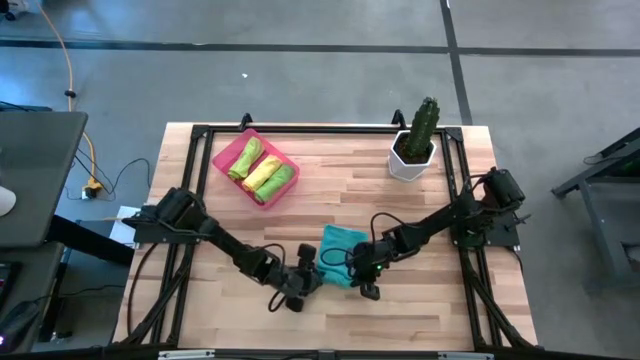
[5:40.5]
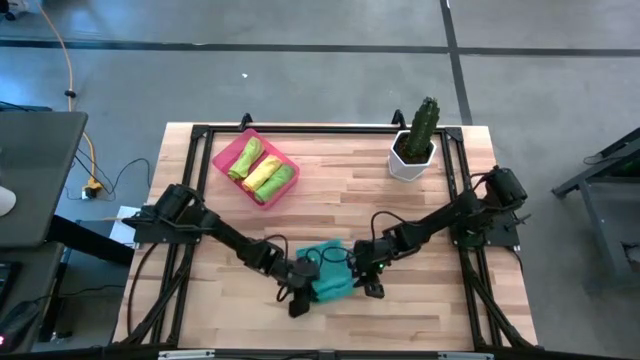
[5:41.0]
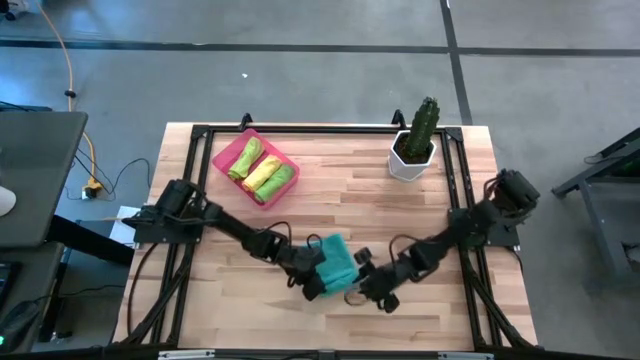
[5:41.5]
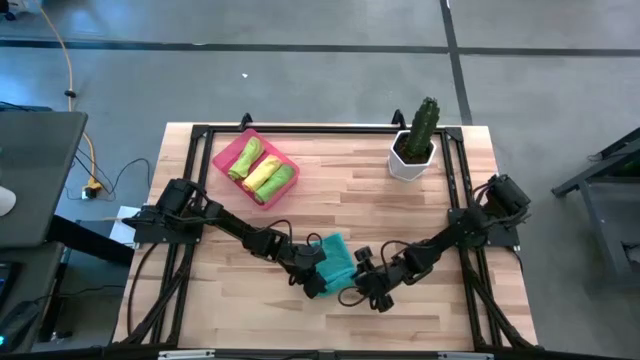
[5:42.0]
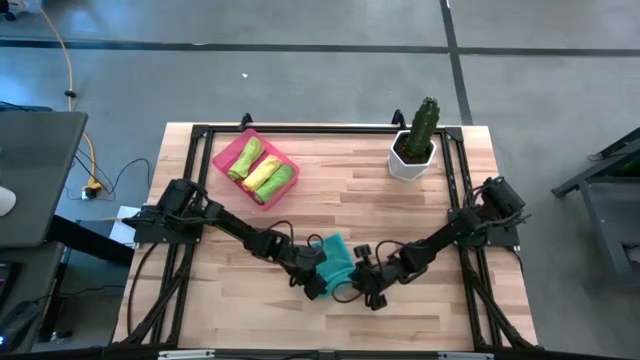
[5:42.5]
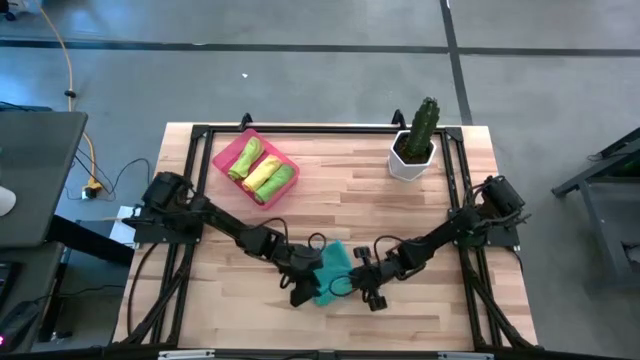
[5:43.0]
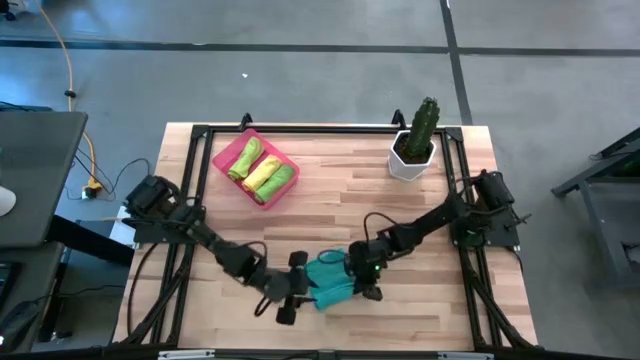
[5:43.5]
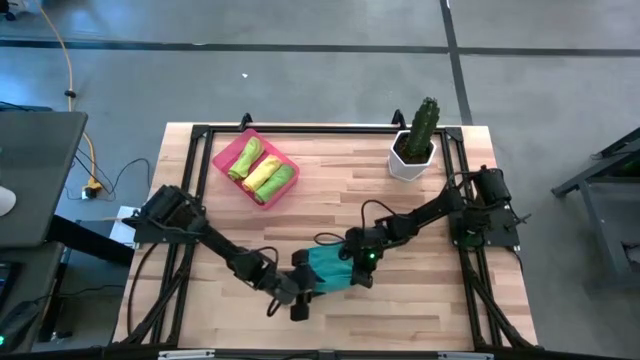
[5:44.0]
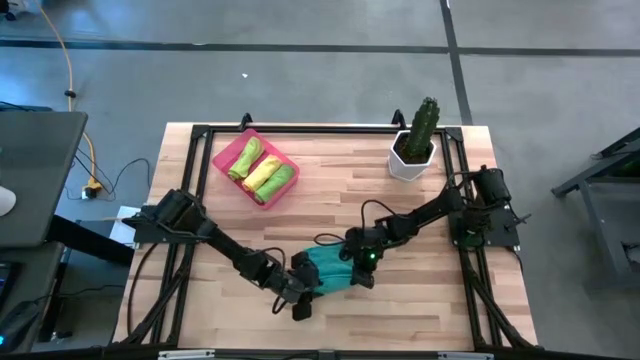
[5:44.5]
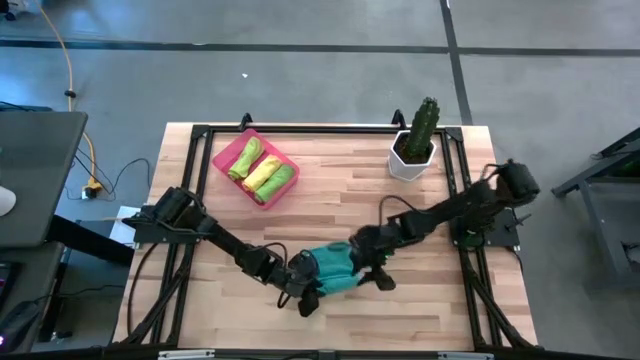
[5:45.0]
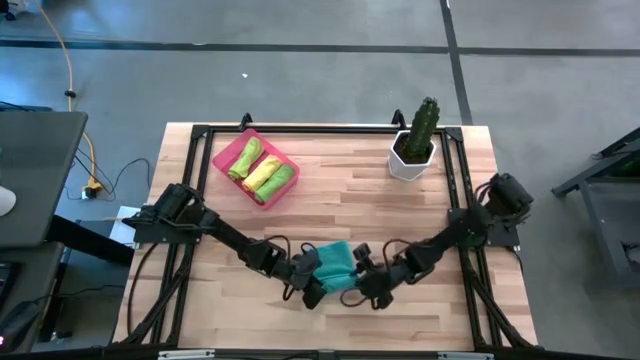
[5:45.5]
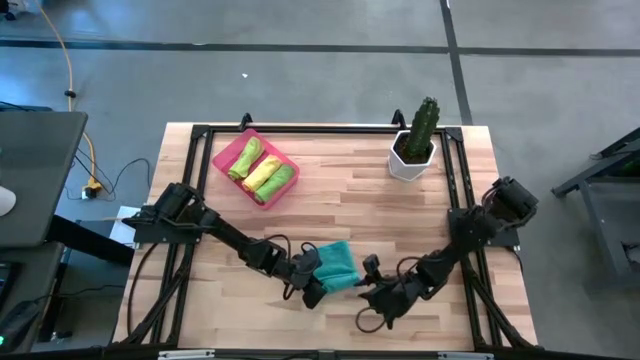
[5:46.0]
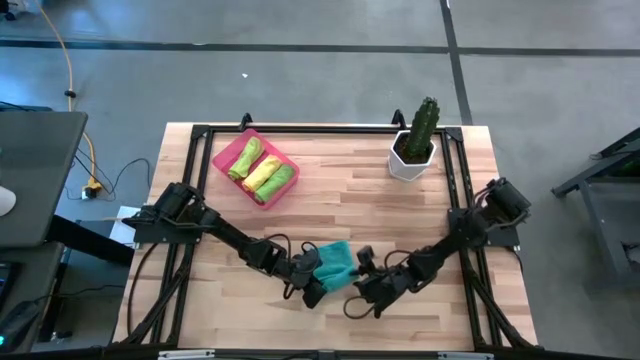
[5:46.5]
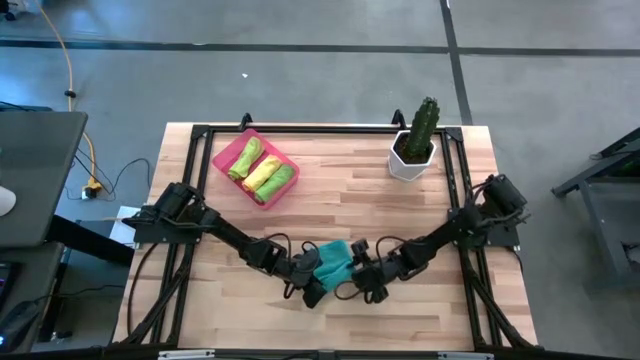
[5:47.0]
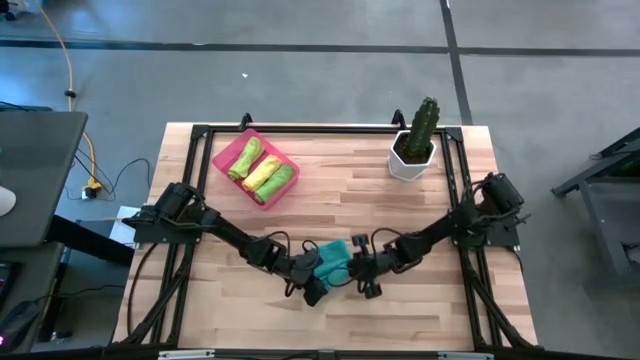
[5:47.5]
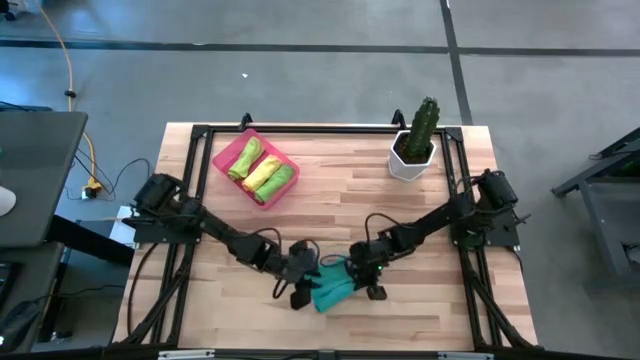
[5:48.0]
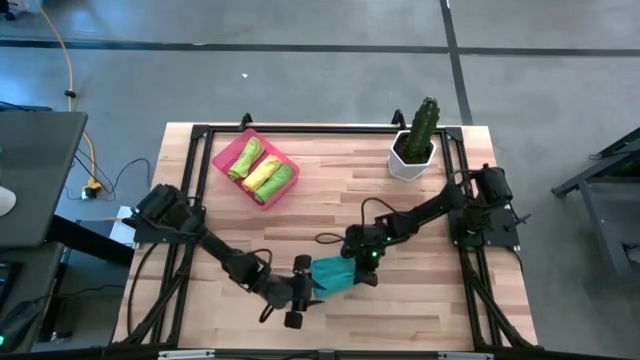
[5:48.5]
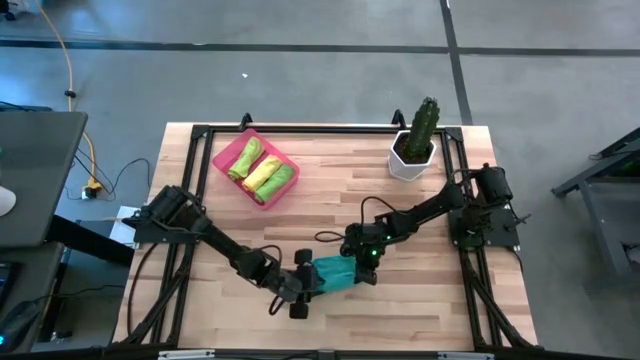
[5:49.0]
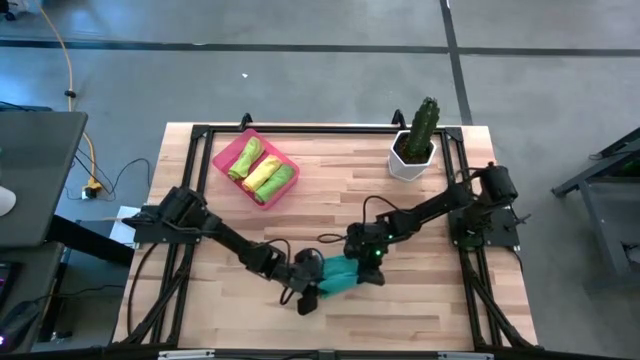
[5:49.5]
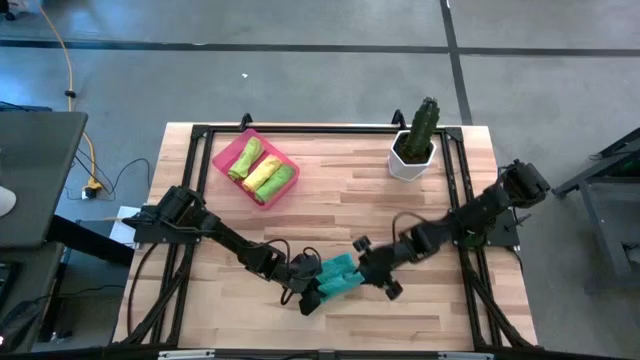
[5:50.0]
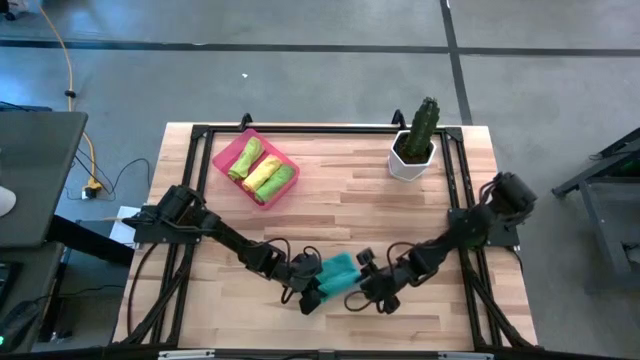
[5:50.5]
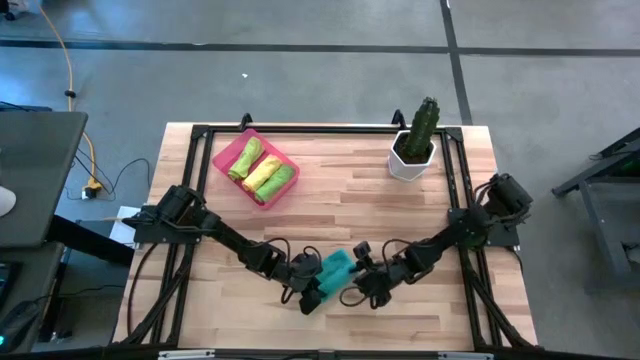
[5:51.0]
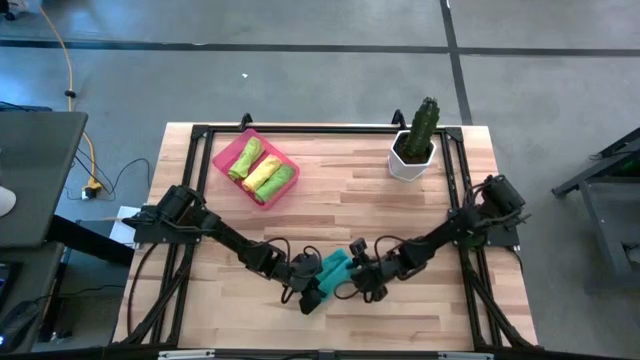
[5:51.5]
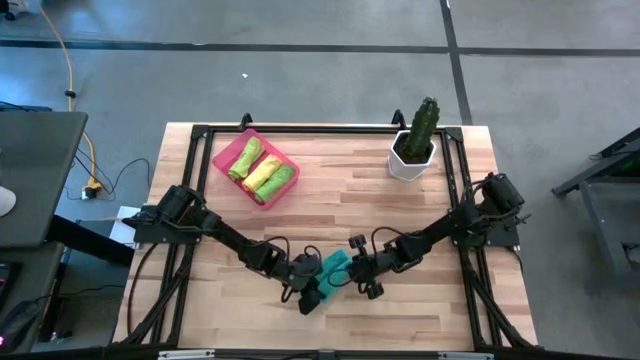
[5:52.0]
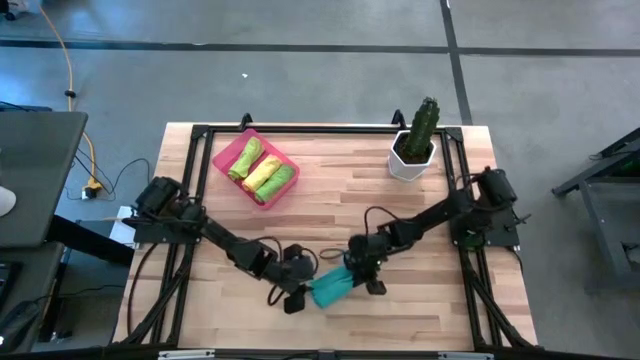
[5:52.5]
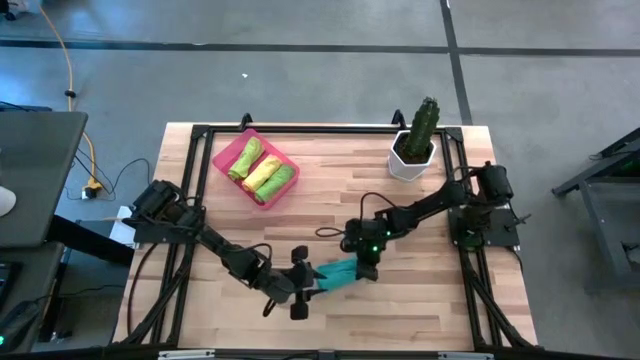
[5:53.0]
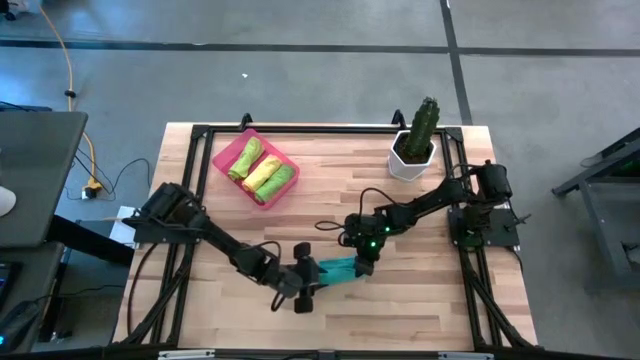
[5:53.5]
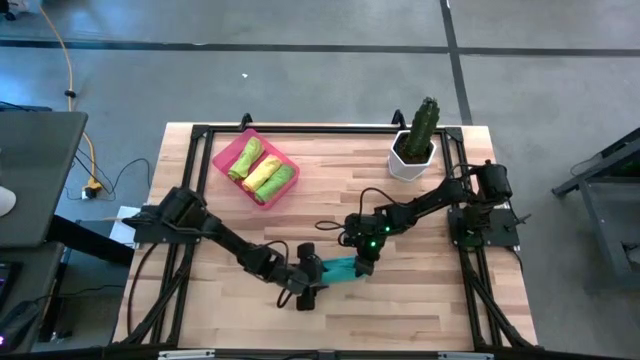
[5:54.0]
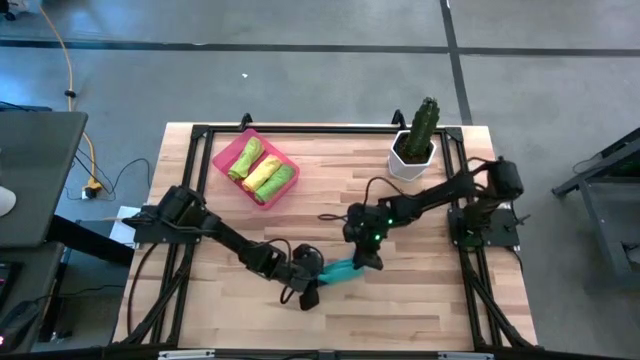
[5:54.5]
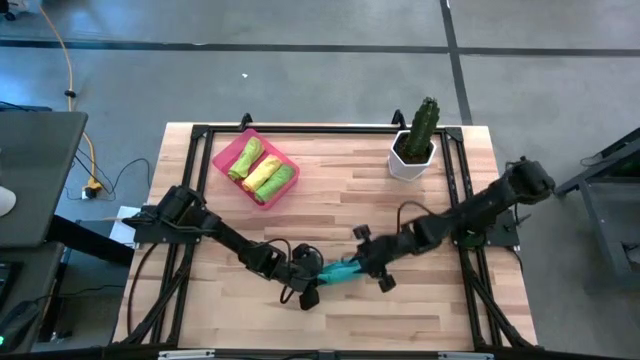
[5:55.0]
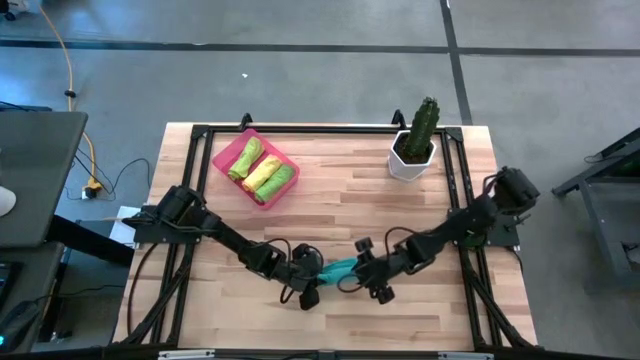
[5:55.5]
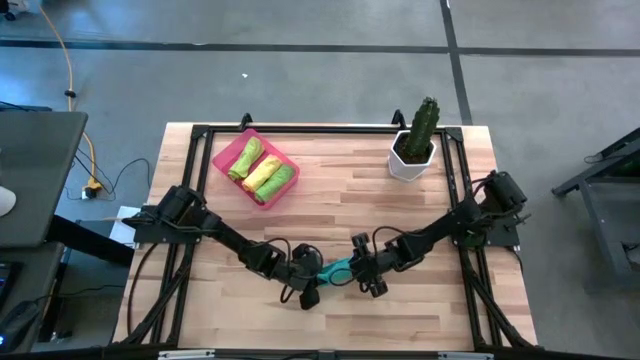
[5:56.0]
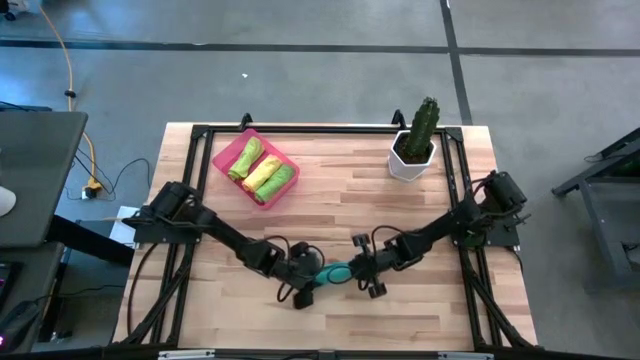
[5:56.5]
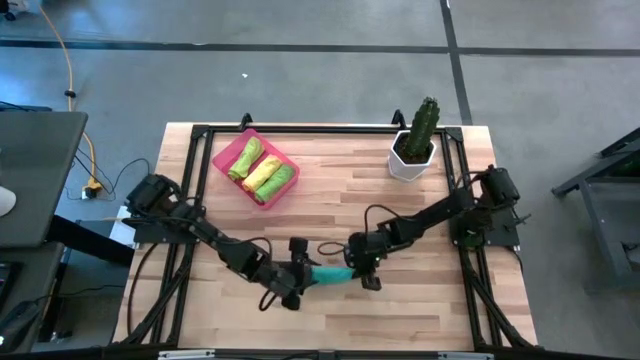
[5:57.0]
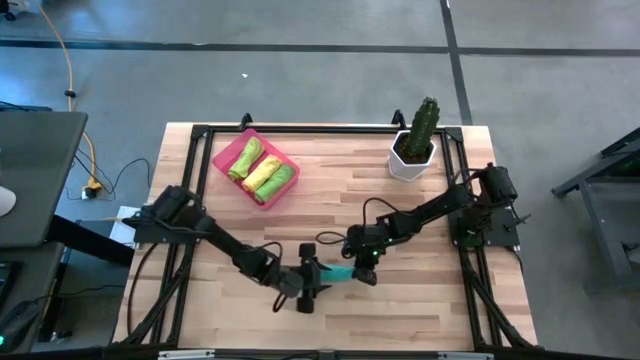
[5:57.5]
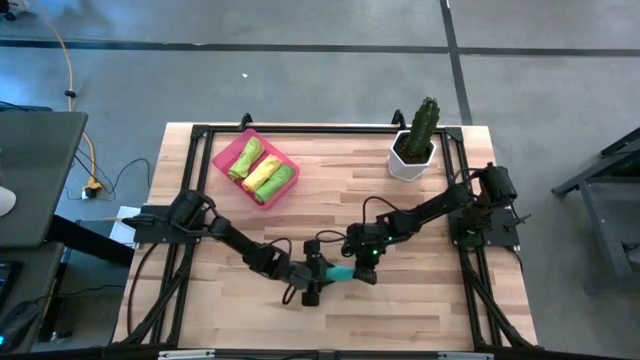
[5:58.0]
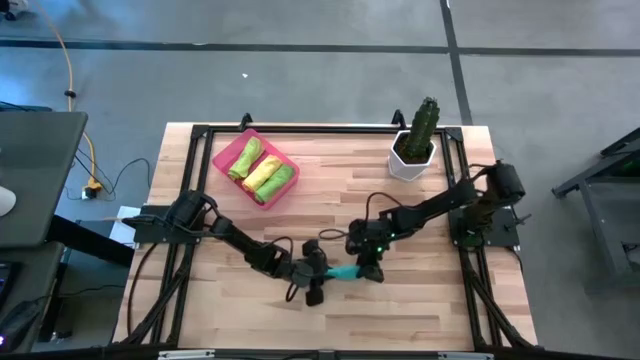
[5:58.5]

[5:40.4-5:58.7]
Task: Roll microfiber towels into tight, uniform cylinder then place into a basket
Roll the blue microfiber cloth

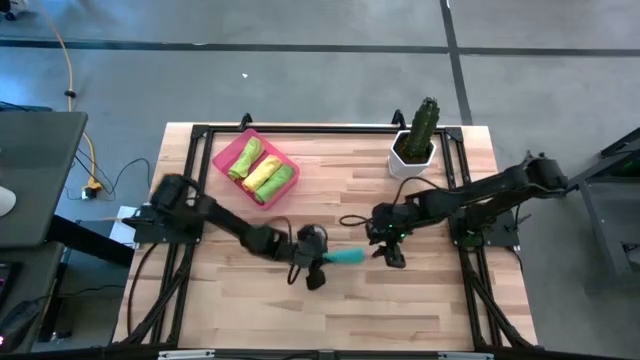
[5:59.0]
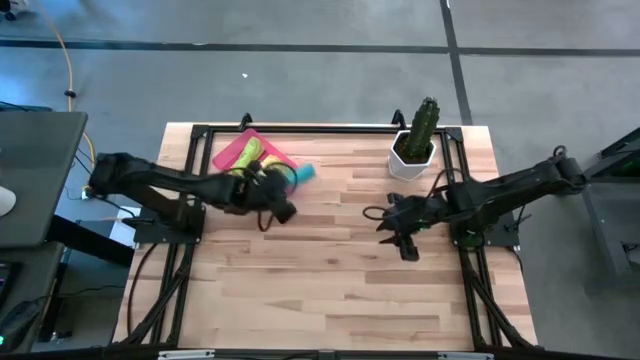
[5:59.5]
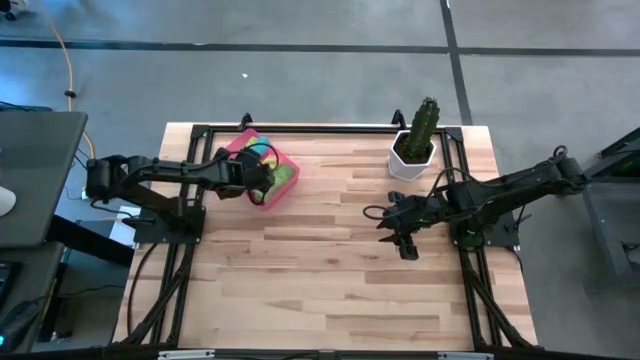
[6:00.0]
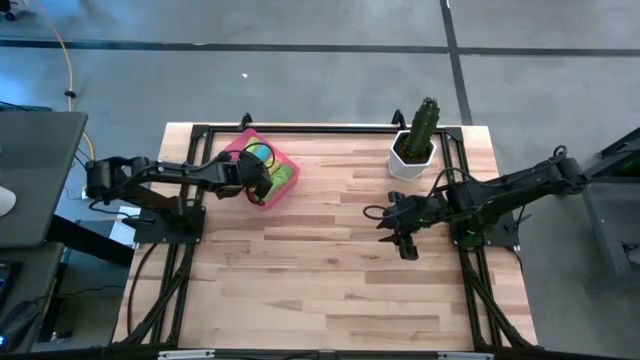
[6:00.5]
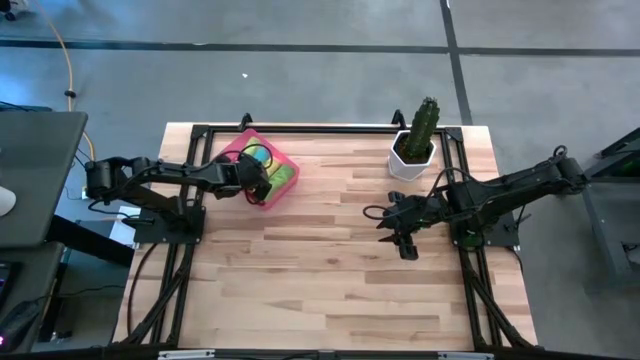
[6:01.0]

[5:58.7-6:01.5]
Put the rolled blue microfiber cloth into the pink bin
